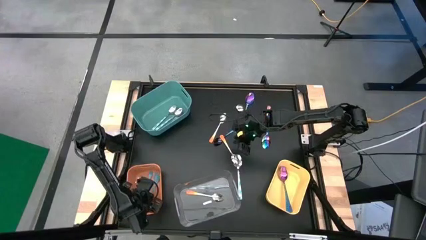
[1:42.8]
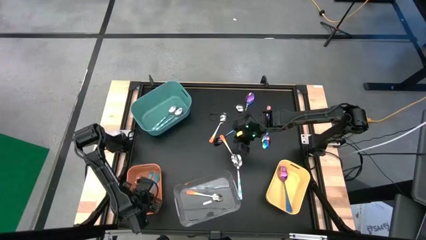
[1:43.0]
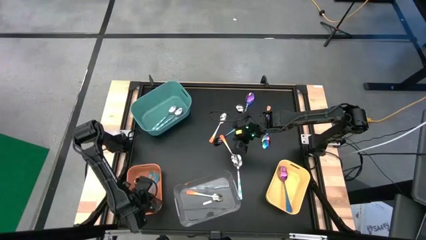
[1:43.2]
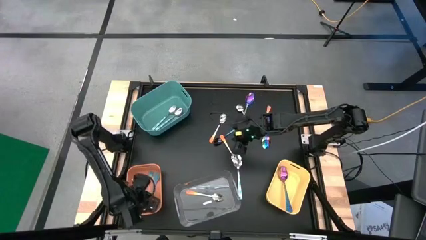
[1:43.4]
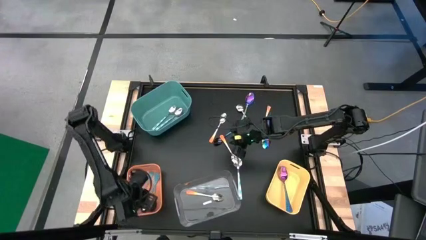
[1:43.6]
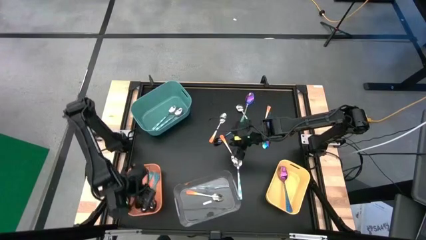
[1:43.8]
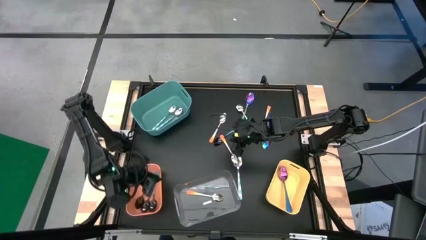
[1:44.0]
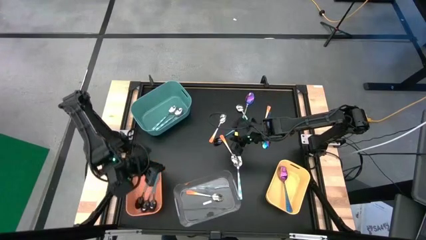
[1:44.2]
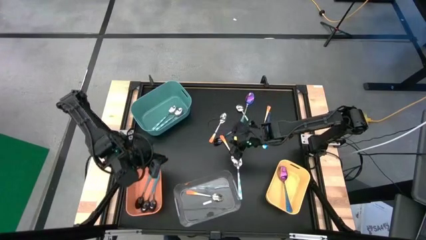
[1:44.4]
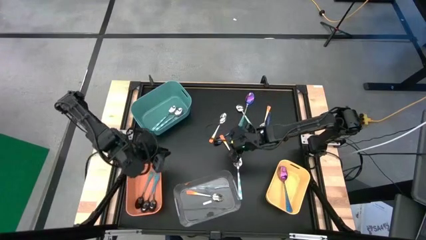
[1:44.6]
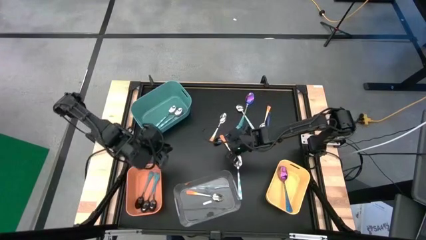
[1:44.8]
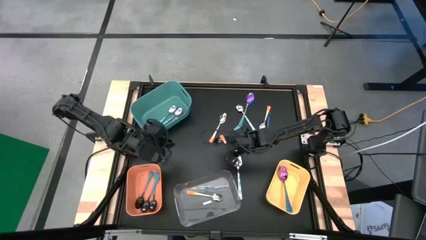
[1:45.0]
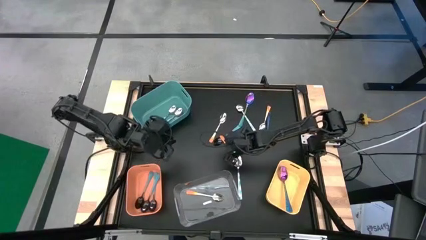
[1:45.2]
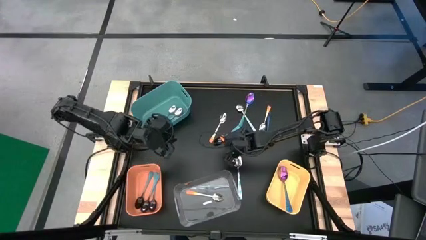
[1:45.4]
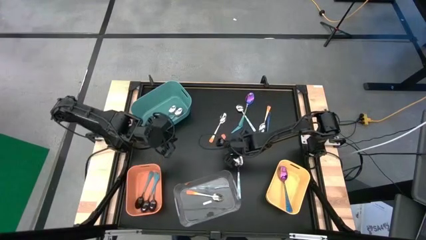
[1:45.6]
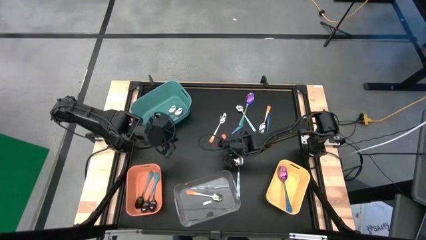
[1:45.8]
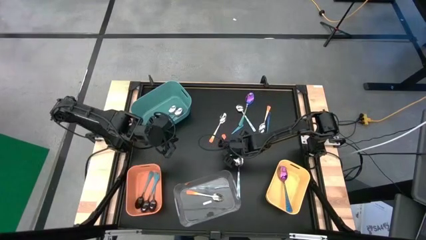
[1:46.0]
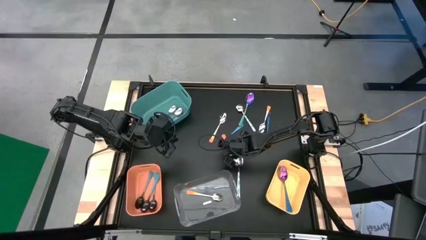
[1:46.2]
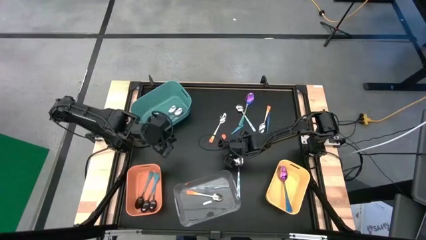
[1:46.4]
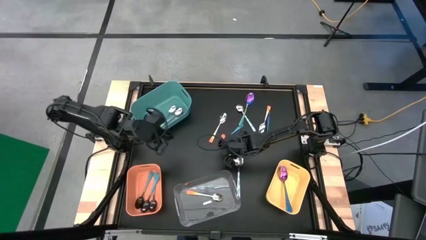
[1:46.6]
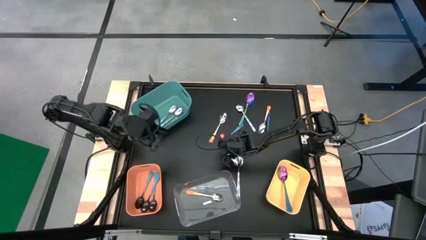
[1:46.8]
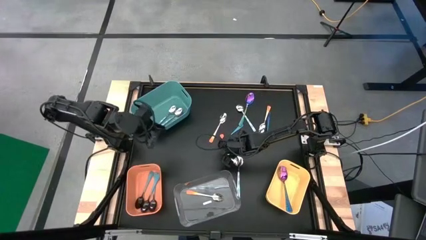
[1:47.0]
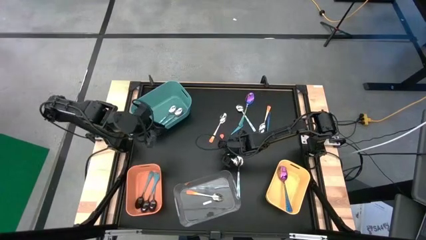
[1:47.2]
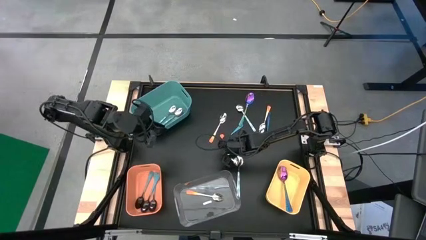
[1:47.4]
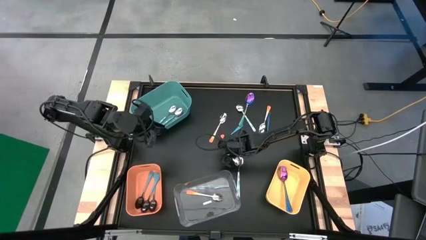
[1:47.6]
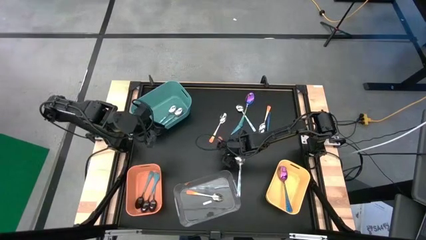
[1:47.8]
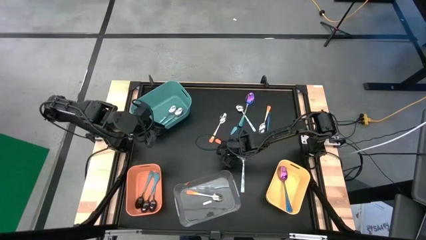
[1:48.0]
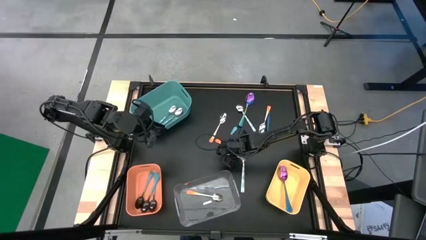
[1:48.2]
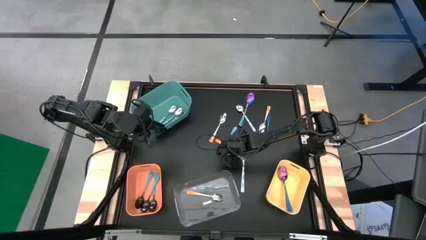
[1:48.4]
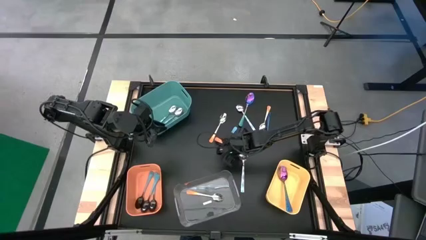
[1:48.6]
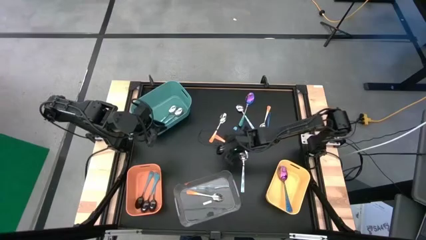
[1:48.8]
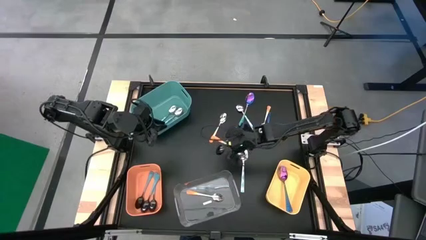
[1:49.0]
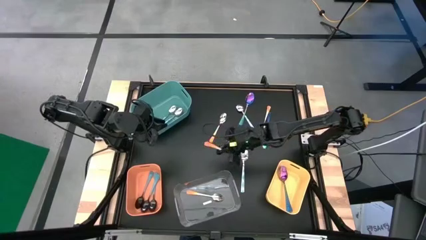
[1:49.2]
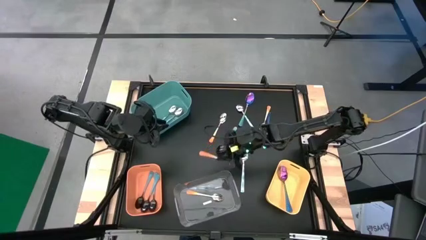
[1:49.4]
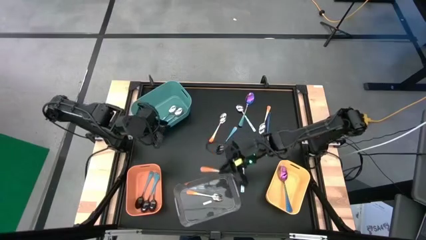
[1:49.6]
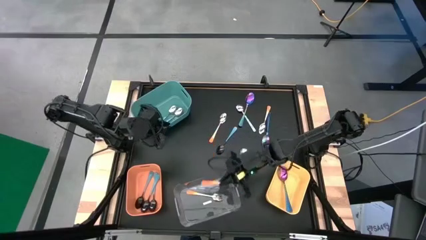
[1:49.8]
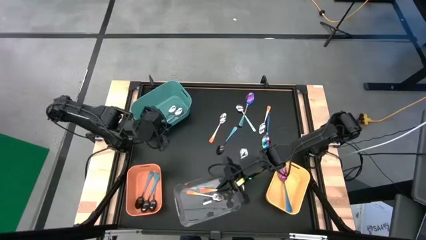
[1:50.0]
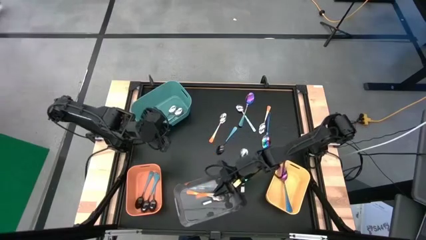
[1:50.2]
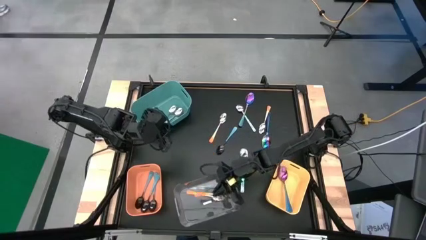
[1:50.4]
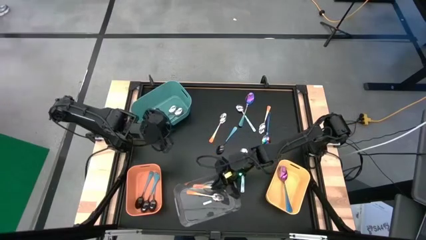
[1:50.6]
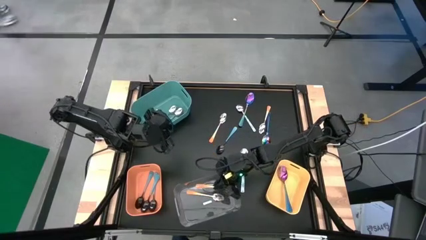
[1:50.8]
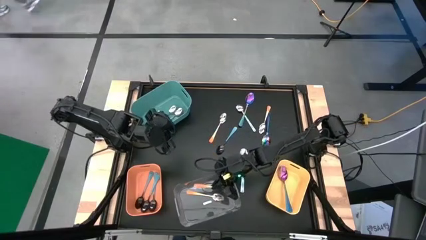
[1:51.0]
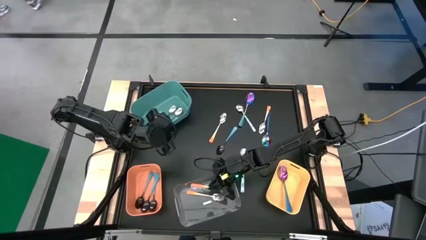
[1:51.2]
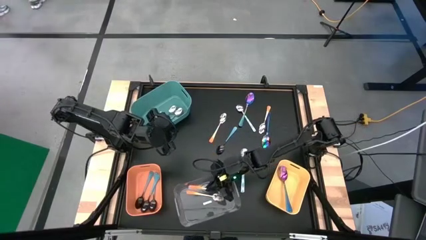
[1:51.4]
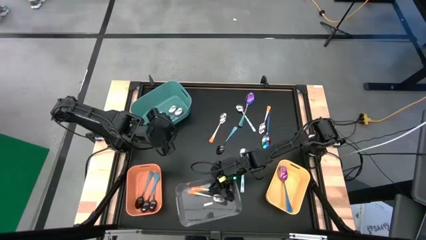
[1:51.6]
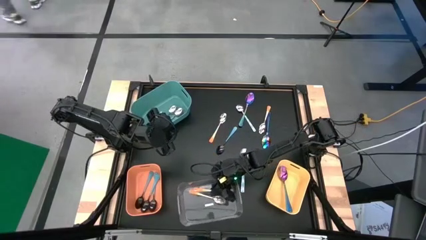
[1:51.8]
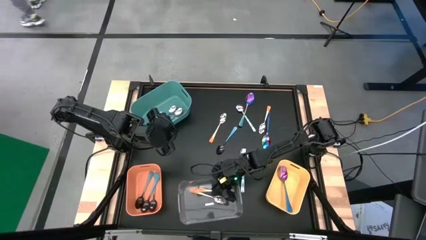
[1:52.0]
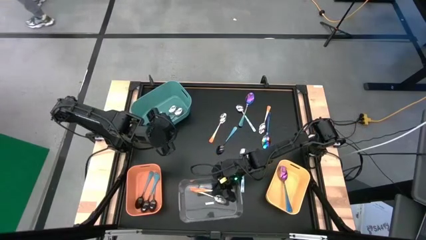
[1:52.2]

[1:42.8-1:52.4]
Task: Sort silverware by color (type)
Put the orange spoon into the transparent bin

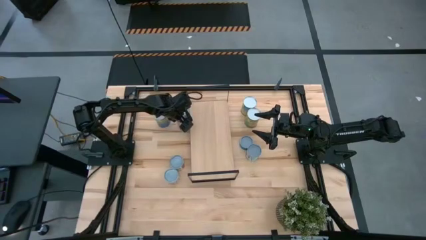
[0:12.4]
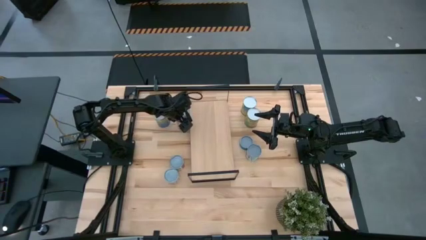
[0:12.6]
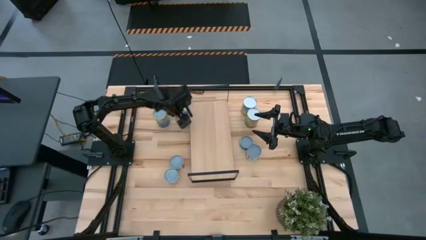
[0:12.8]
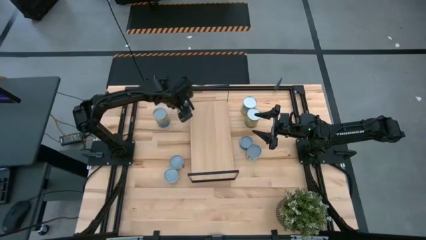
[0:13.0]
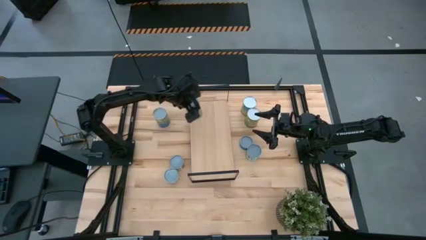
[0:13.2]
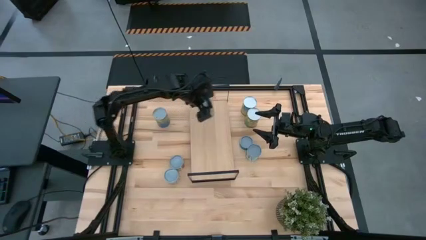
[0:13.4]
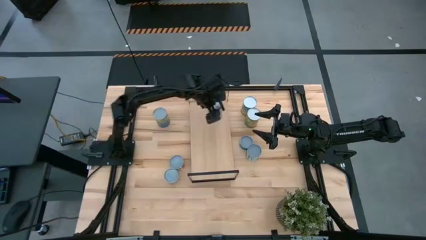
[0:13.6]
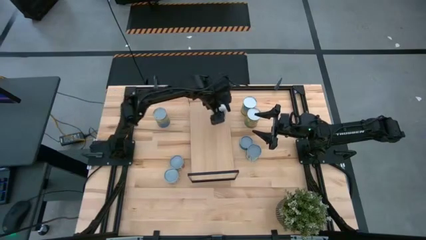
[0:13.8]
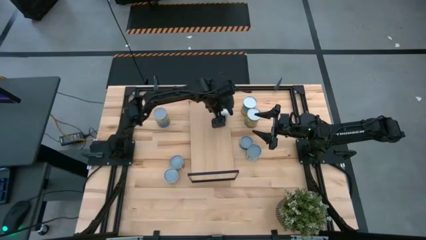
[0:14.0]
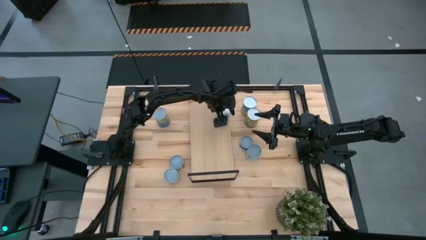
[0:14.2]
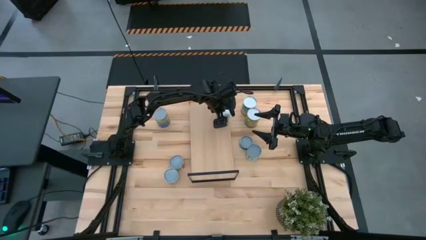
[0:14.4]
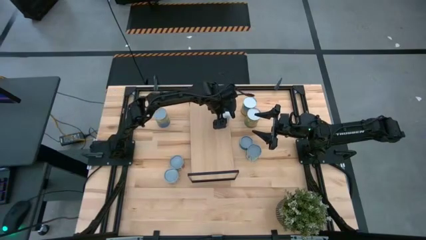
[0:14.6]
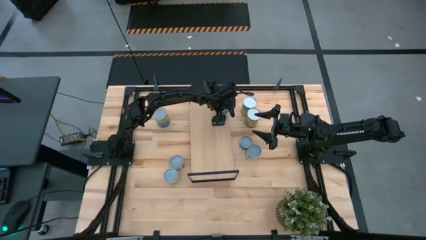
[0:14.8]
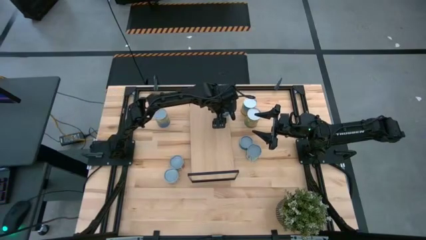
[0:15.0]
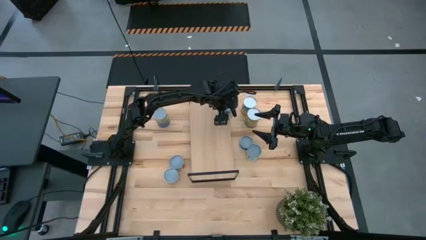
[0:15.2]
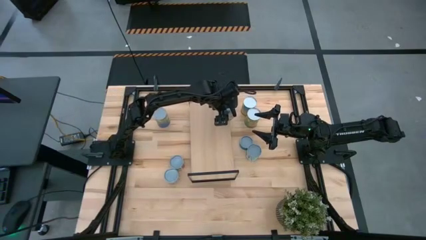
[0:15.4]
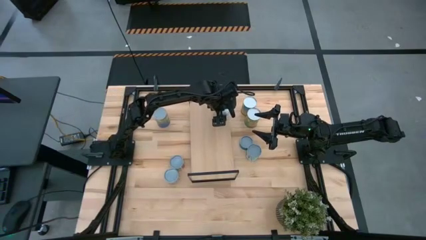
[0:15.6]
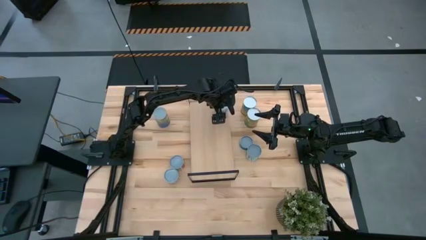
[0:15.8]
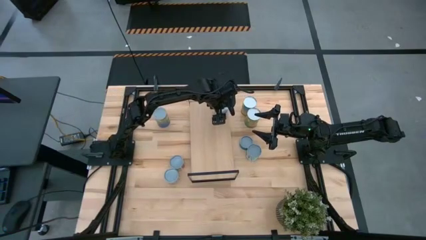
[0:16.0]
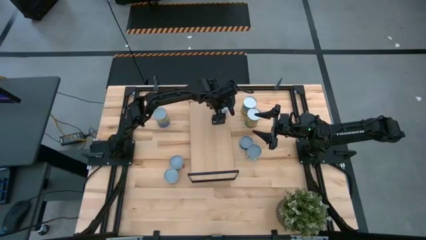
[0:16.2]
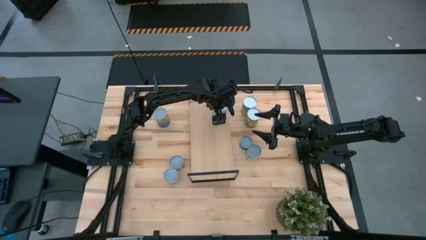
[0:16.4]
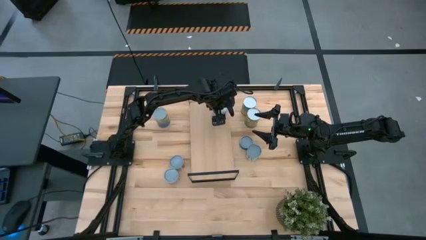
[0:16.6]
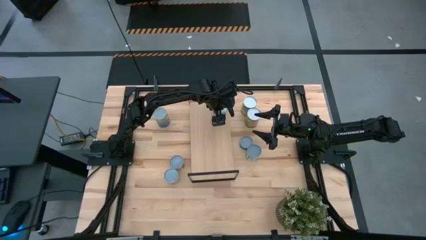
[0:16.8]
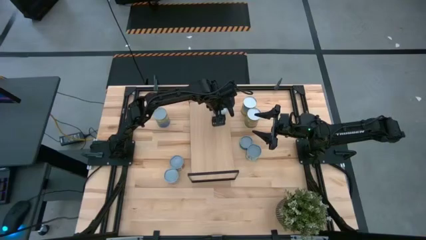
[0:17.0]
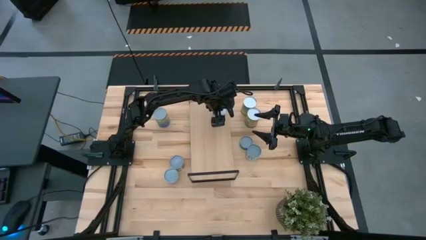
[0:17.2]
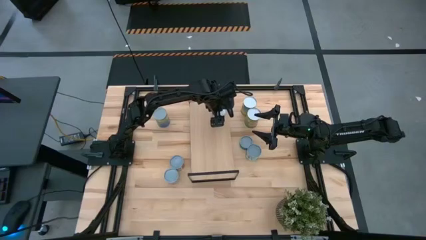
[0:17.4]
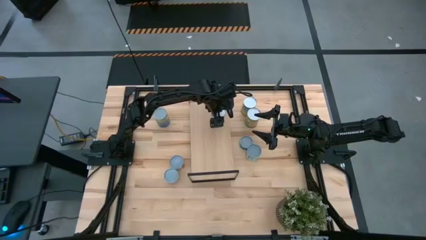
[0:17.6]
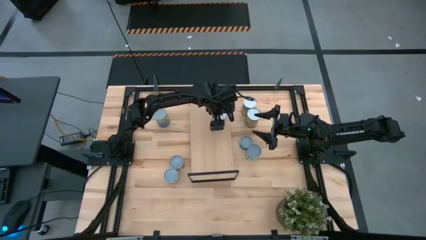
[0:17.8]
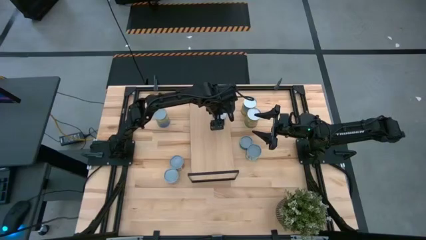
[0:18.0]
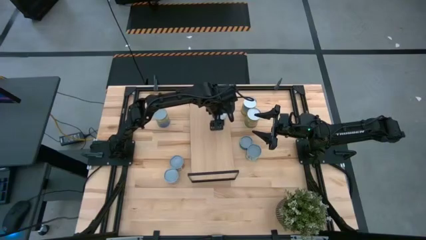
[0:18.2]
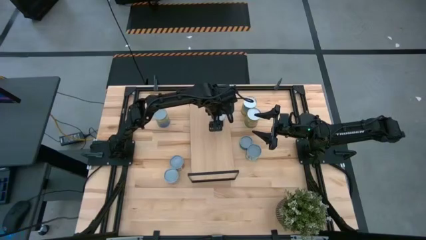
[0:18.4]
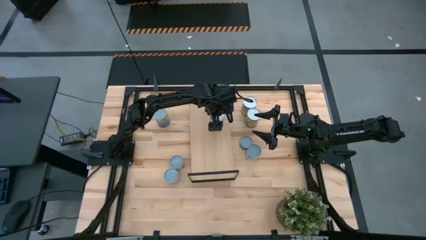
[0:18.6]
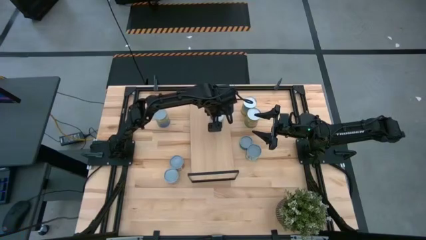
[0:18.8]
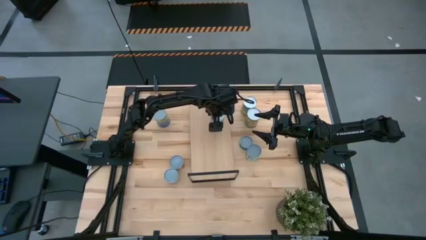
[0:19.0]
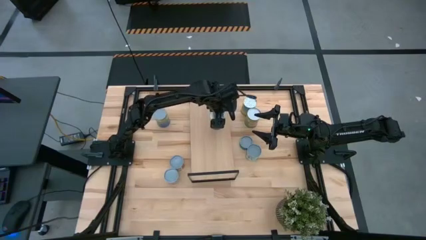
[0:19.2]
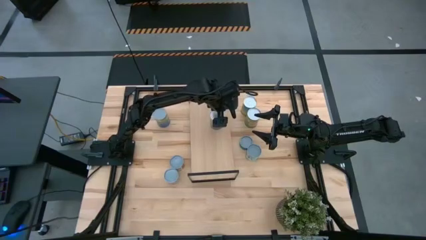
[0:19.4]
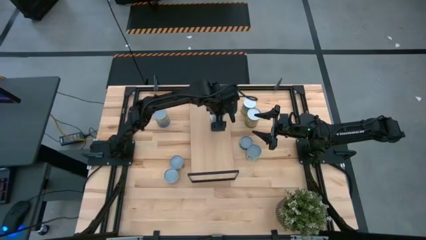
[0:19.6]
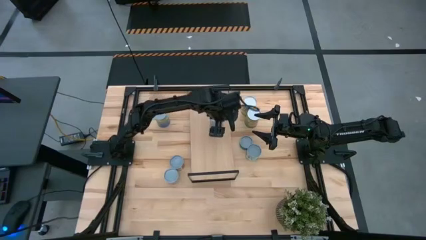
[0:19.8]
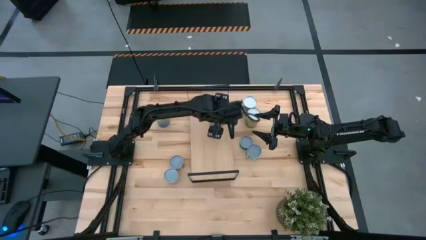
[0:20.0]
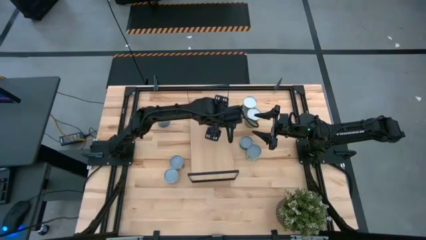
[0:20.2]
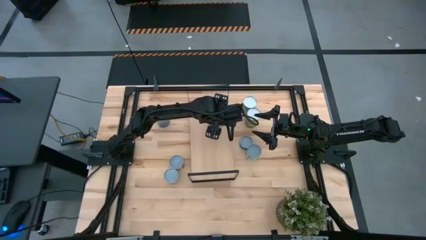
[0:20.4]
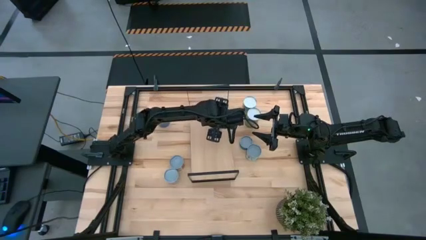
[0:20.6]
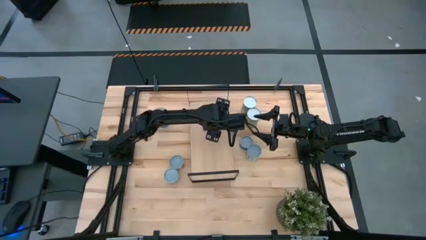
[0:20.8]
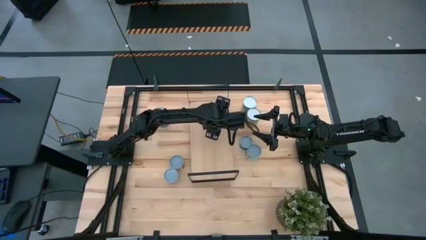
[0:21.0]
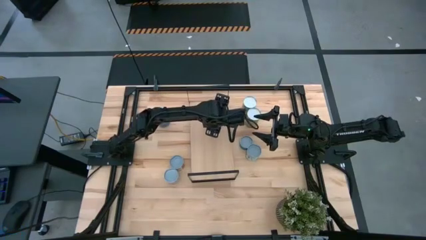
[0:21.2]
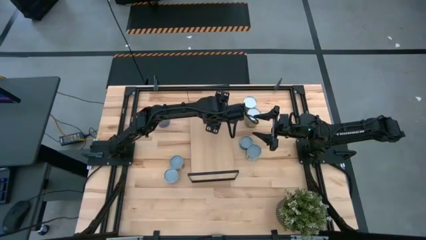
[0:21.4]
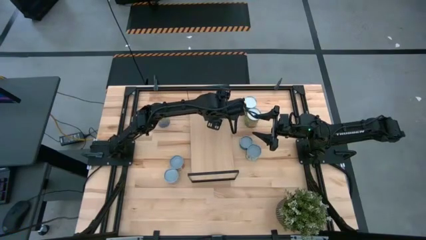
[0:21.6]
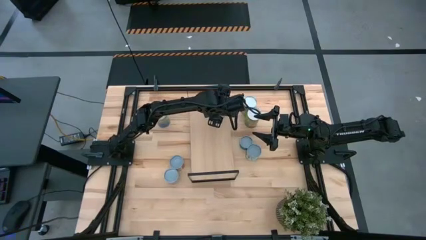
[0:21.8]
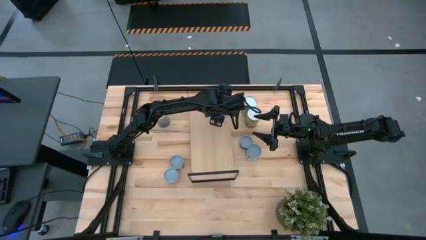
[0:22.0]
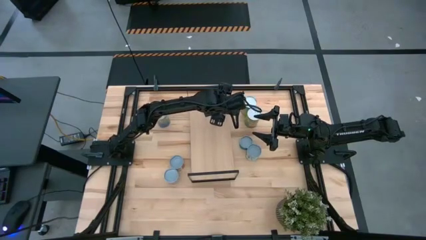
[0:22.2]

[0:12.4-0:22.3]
Task: Pick and place cans onto a shelf
Put the canned peaches on the shelf
